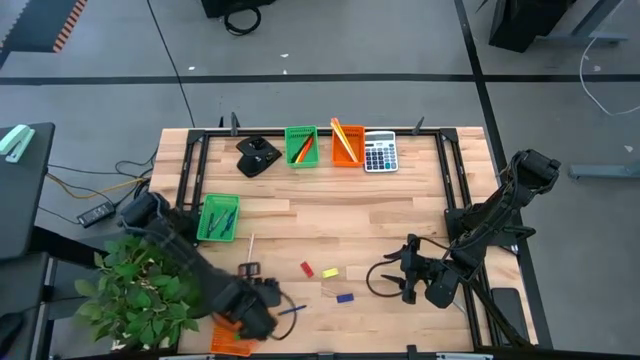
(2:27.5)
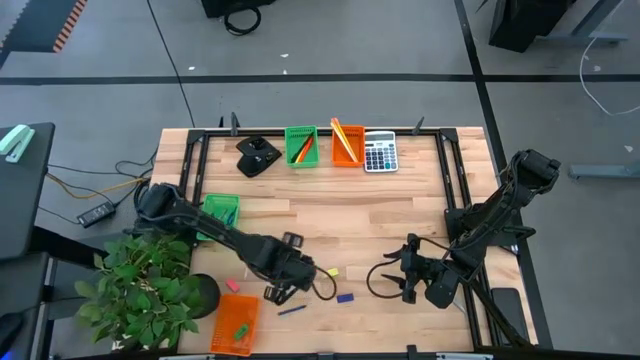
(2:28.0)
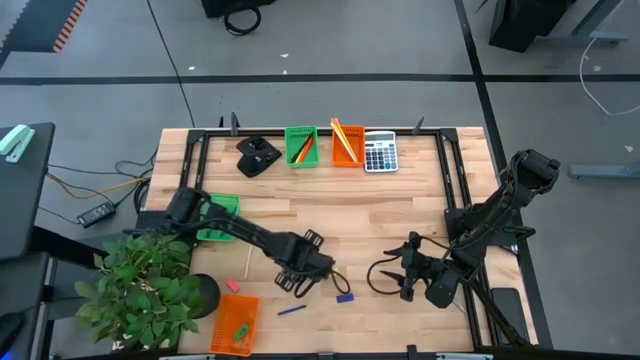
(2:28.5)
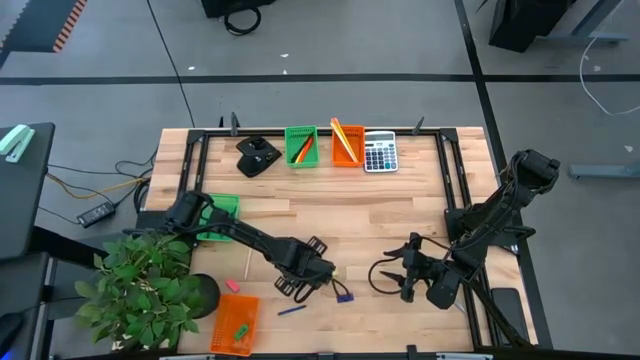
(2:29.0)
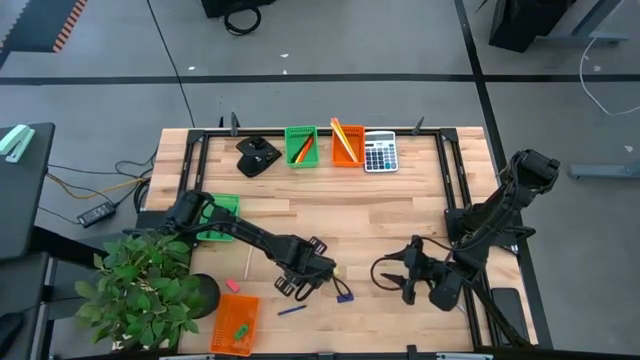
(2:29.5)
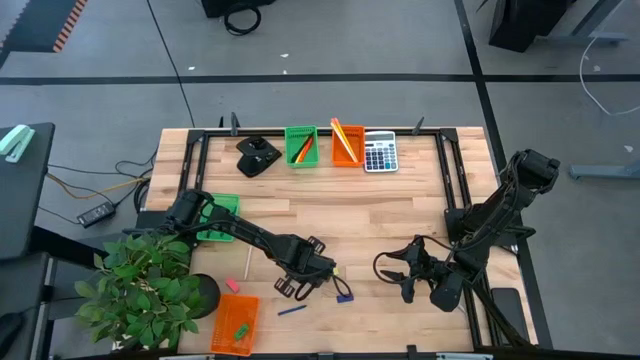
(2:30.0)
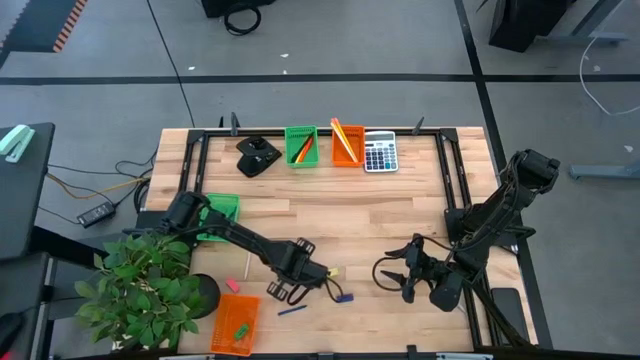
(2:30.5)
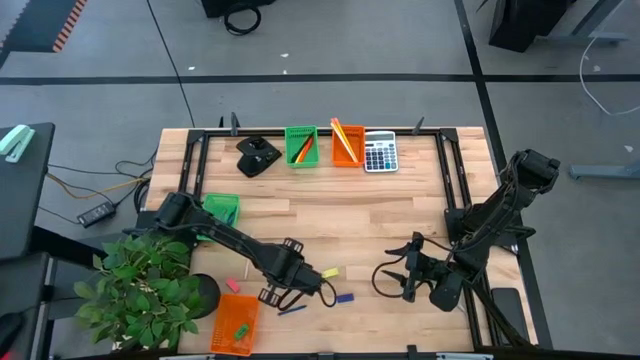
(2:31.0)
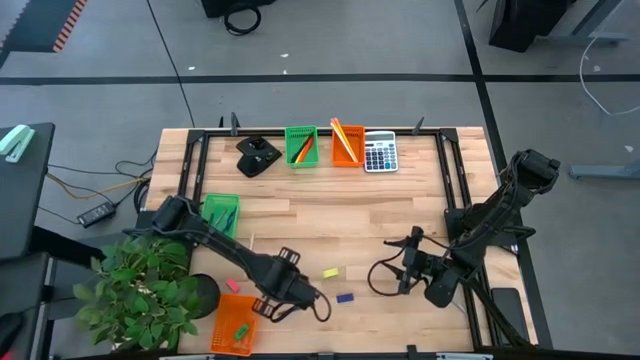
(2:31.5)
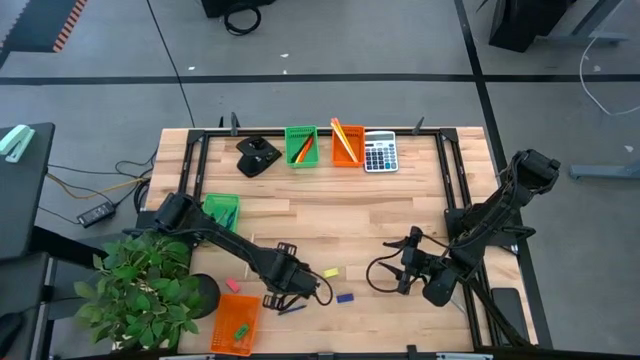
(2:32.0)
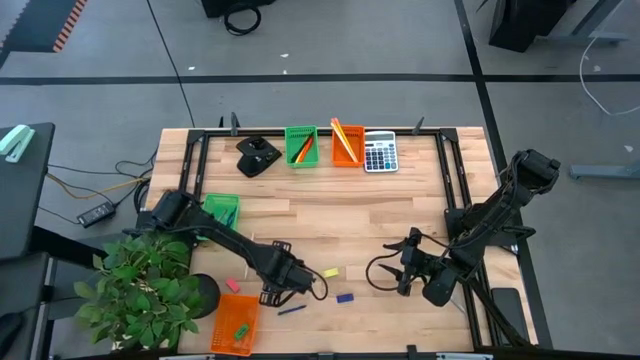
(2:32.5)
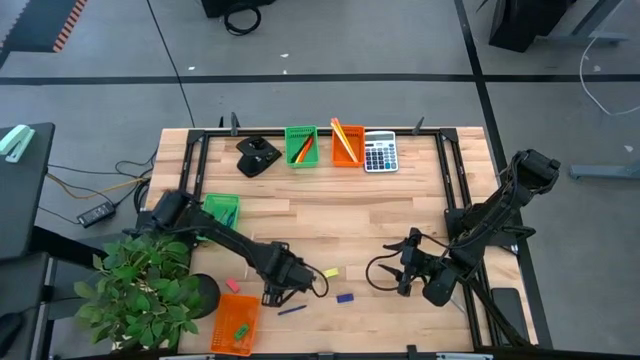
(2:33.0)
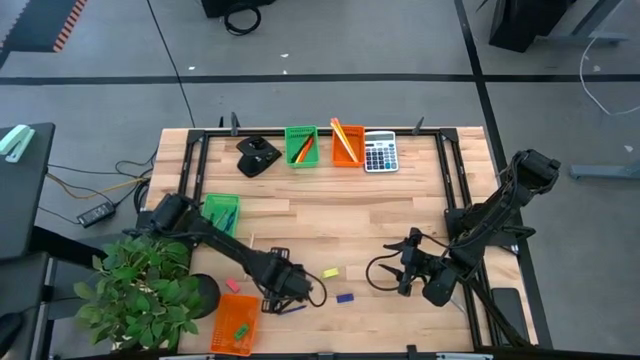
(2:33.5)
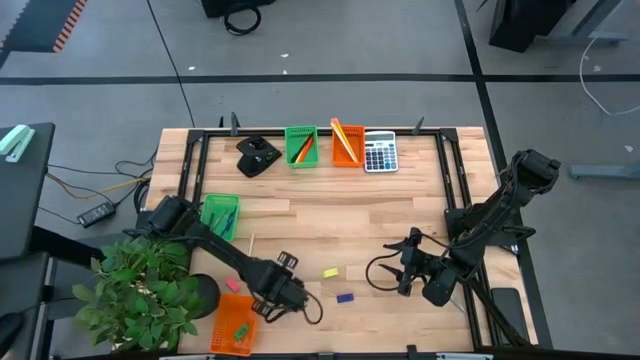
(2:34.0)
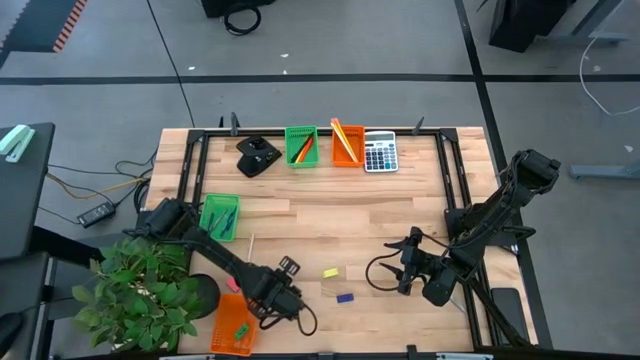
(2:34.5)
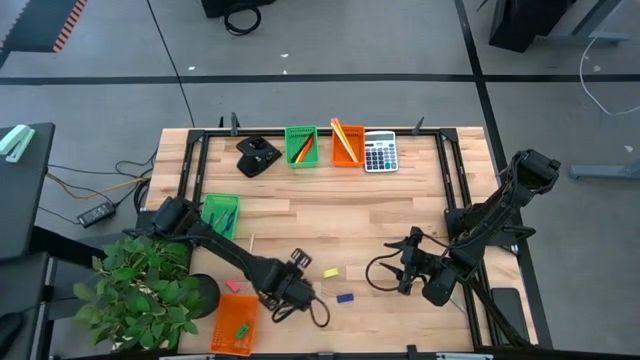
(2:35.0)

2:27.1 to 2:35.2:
Task: Sort crayons/erasers/pens/pencils in bins
Put the orange eraser into the bottom orange bin

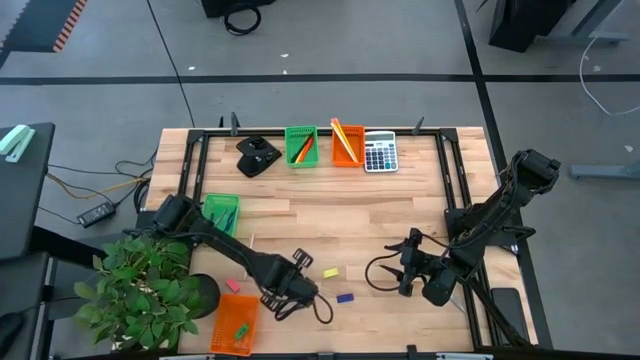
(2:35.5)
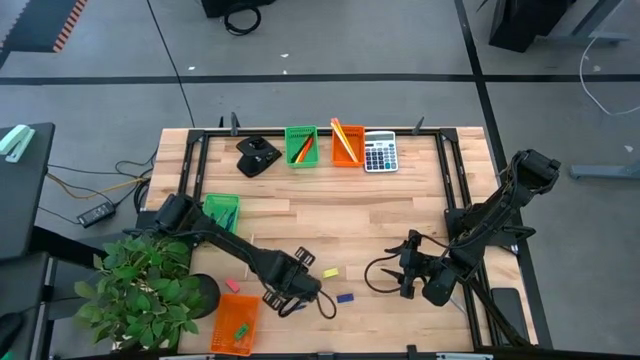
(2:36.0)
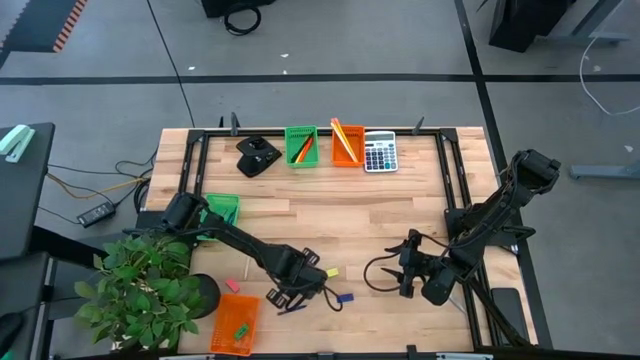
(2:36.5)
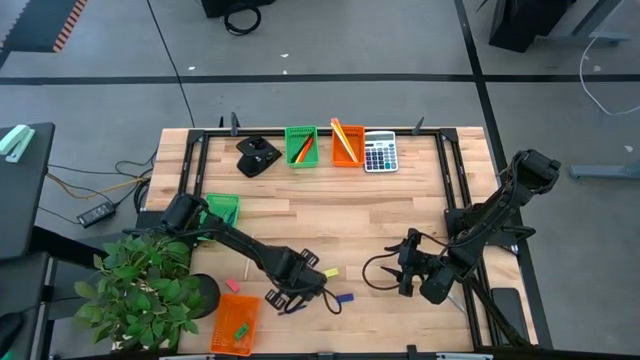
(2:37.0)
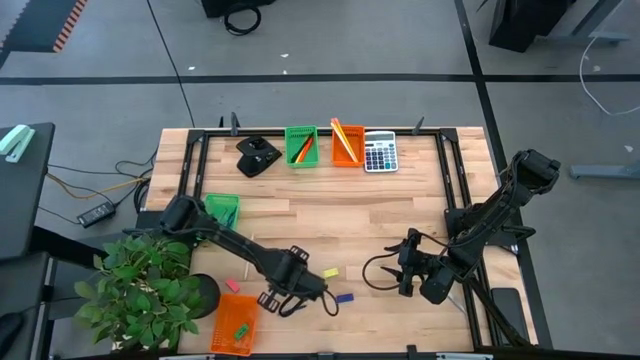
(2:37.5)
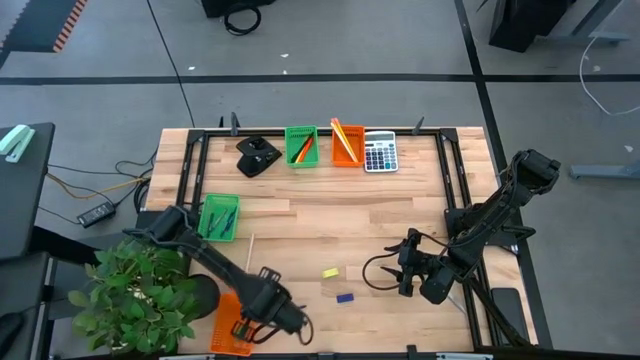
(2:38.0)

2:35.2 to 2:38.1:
Put the orange eraser into the bottom orange bin

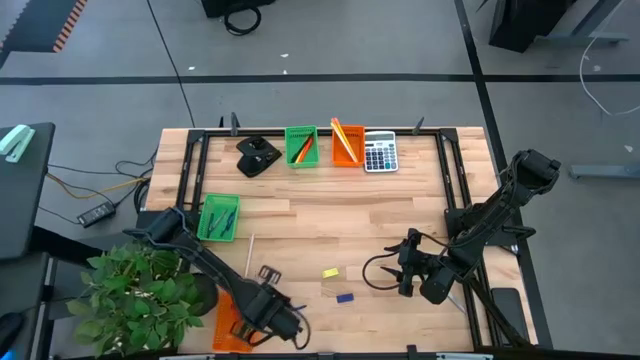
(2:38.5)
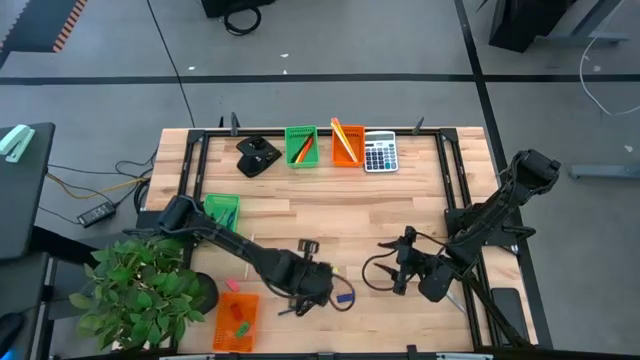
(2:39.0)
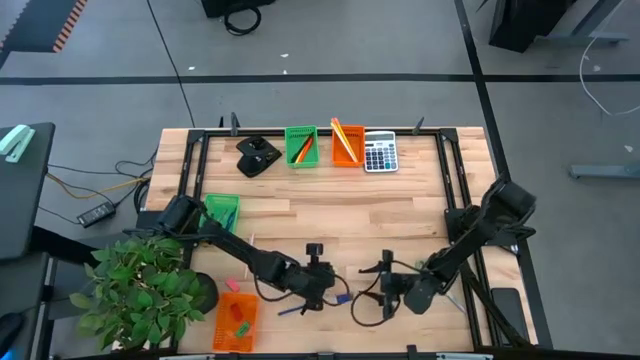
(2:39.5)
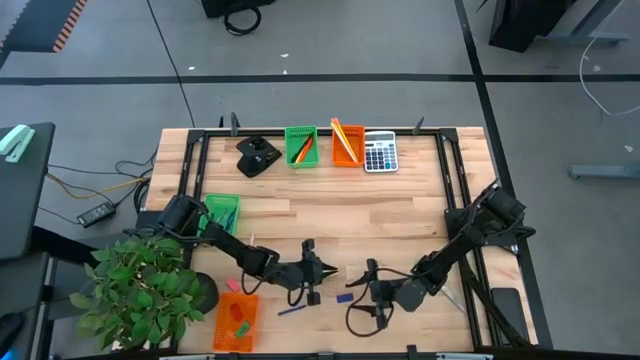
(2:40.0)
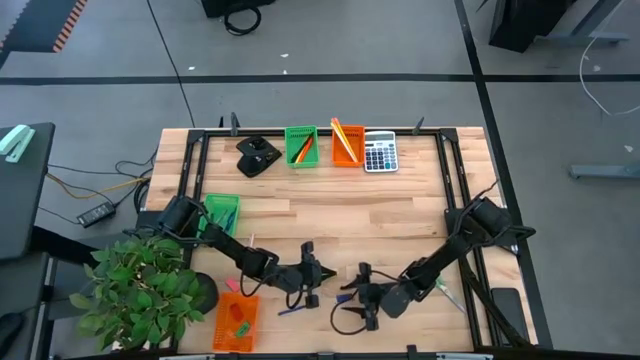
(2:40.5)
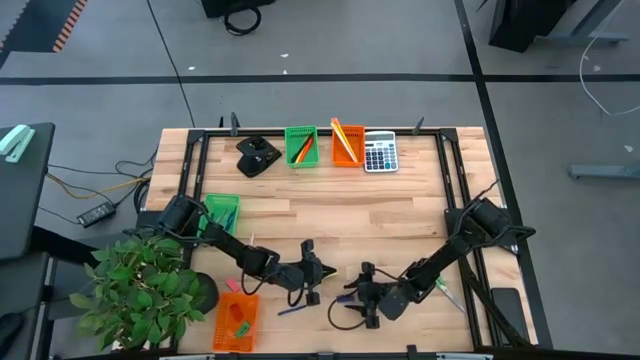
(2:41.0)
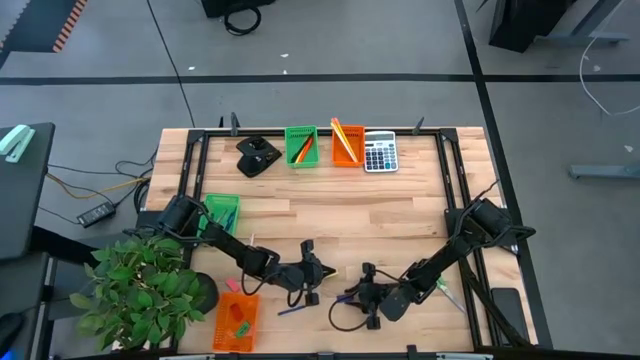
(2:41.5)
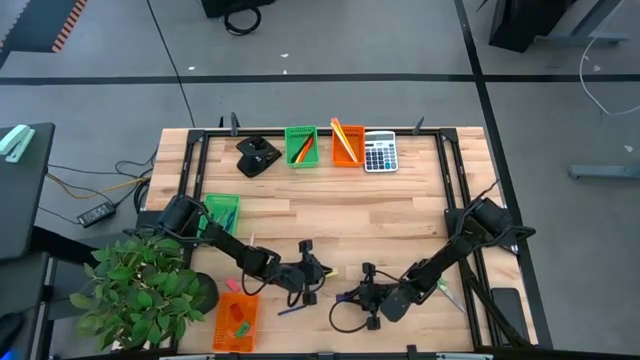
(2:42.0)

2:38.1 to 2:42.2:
Put the blue eraser into the bottom orange bin

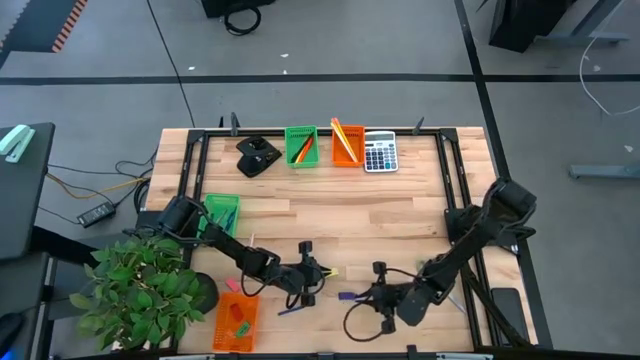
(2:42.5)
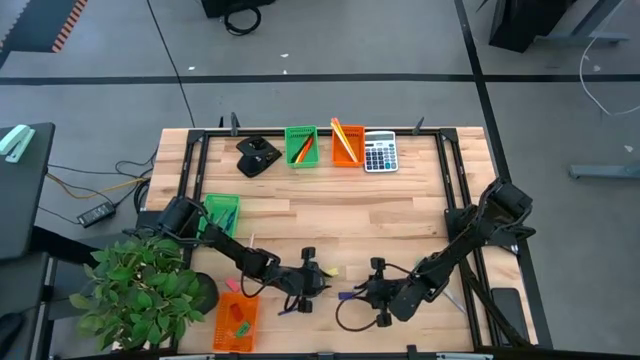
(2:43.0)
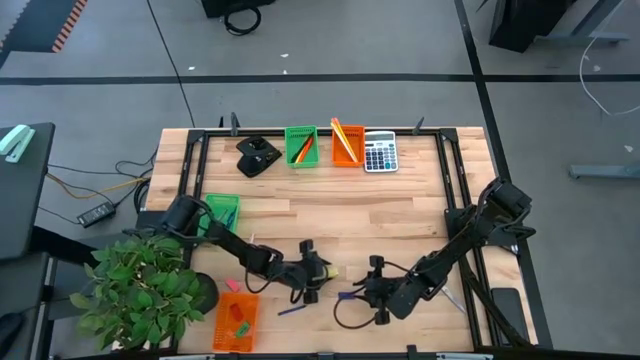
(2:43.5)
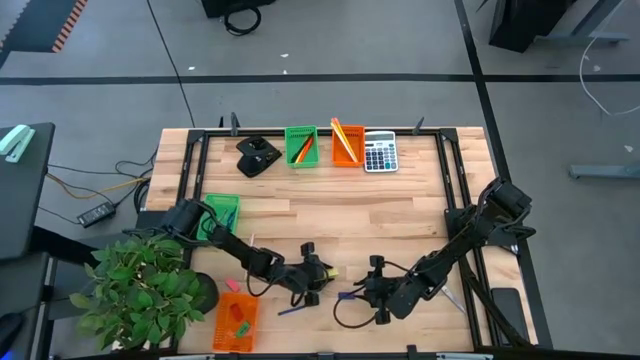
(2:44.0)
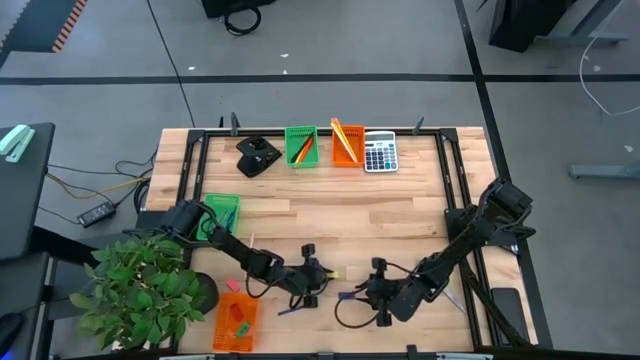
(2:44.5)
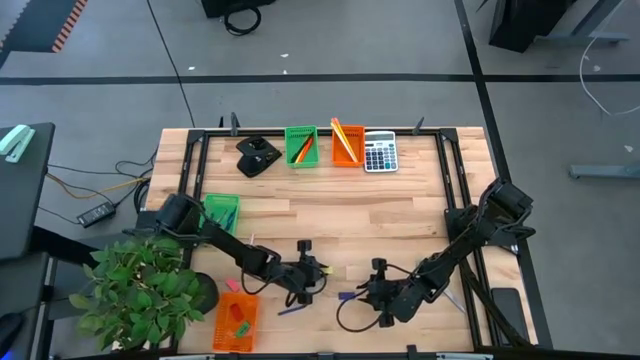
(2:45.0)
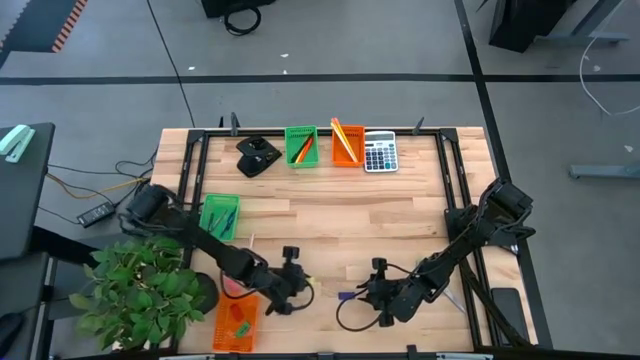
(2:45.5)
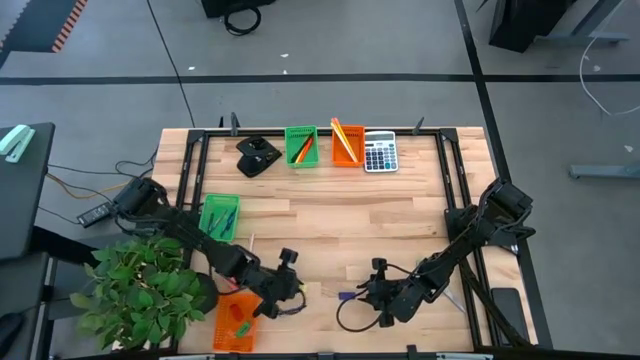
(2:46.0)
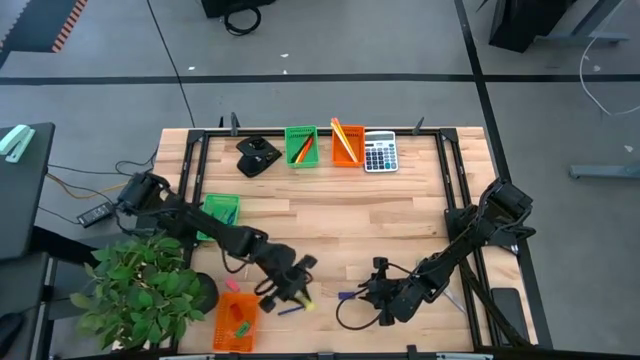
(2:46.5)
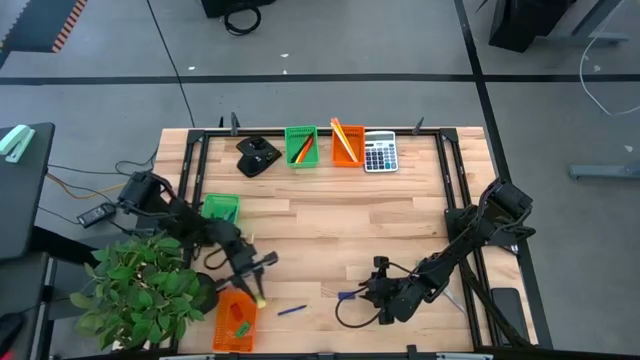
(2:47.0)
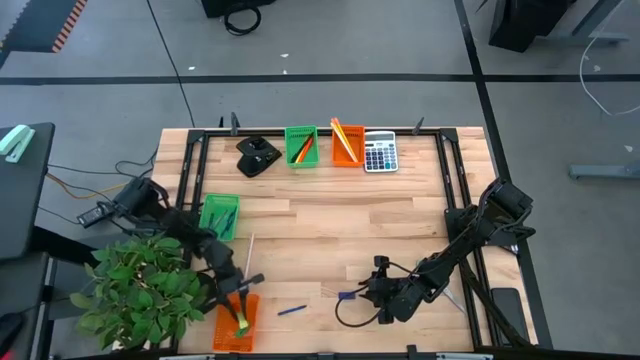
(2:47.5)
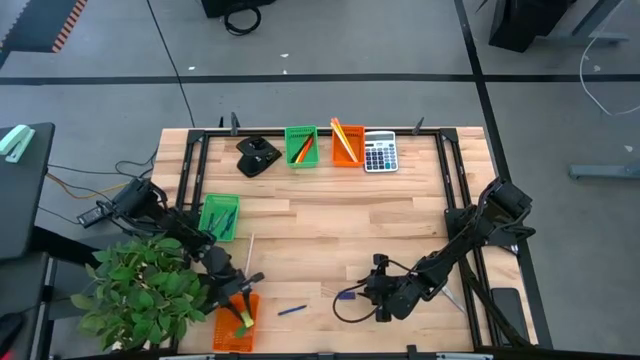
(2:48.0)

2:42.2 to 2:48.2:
Put the yellow eraser into the bottom orange bin
